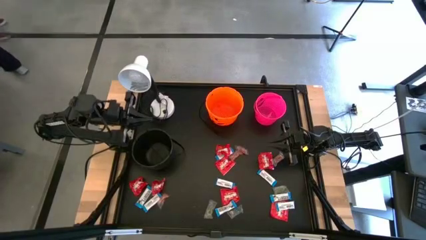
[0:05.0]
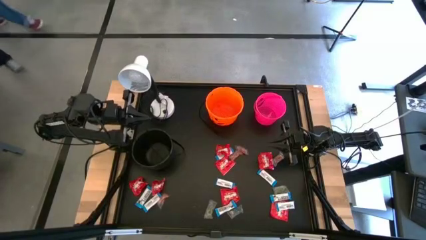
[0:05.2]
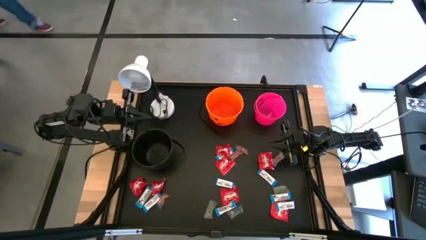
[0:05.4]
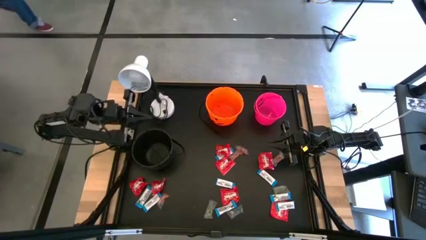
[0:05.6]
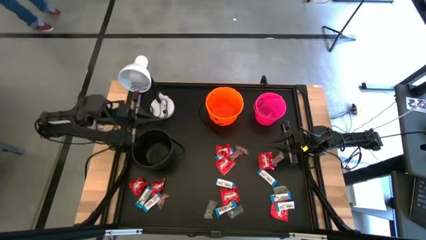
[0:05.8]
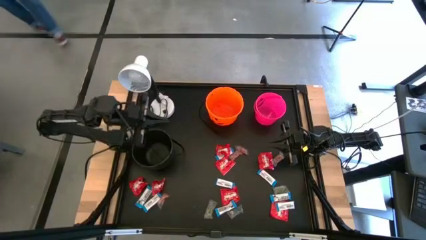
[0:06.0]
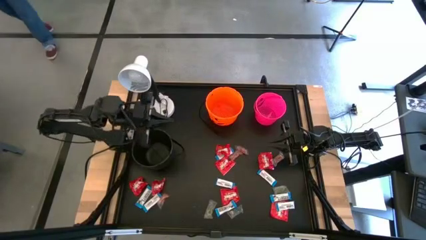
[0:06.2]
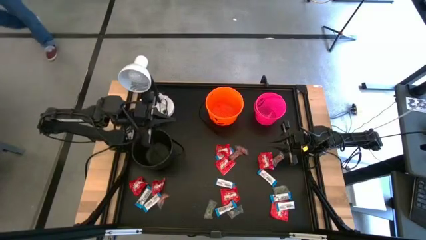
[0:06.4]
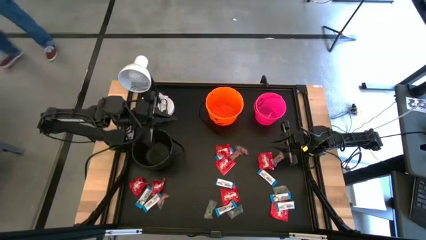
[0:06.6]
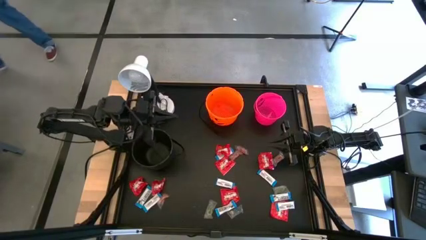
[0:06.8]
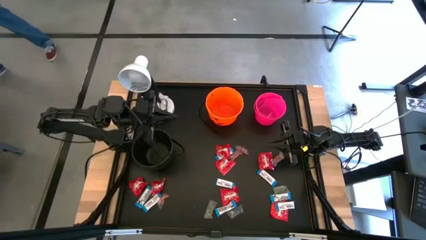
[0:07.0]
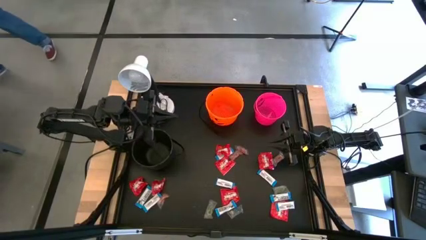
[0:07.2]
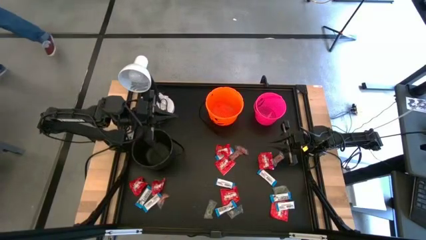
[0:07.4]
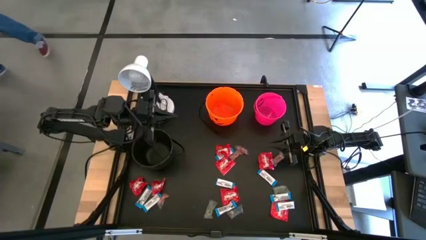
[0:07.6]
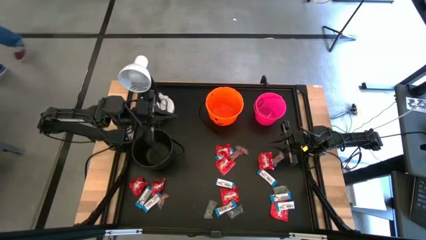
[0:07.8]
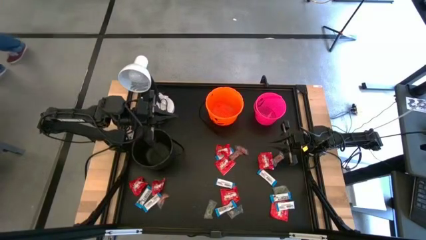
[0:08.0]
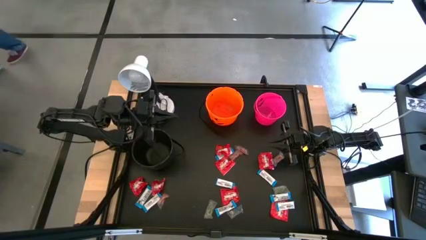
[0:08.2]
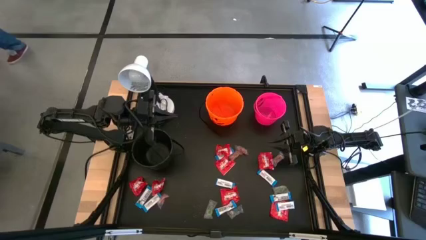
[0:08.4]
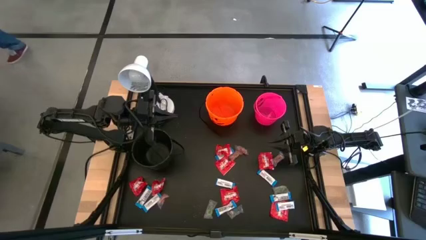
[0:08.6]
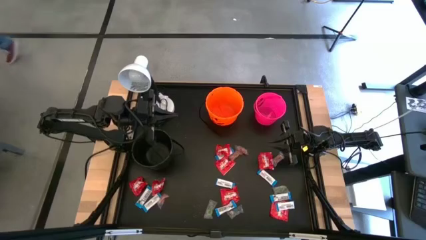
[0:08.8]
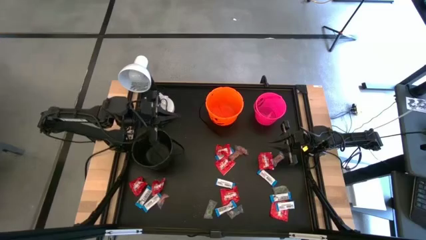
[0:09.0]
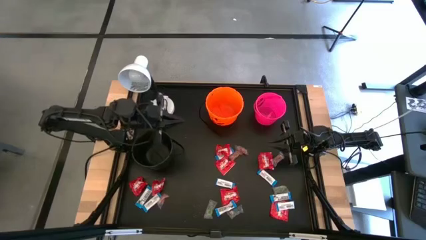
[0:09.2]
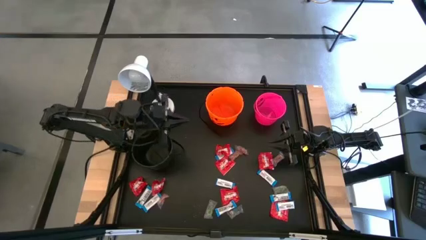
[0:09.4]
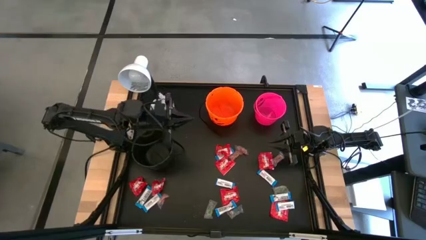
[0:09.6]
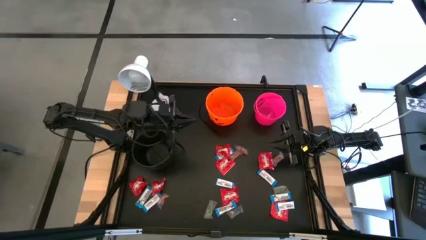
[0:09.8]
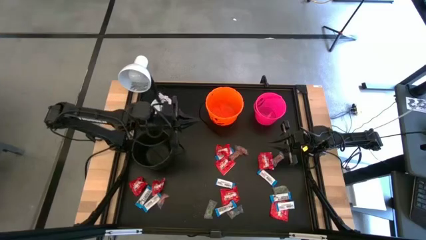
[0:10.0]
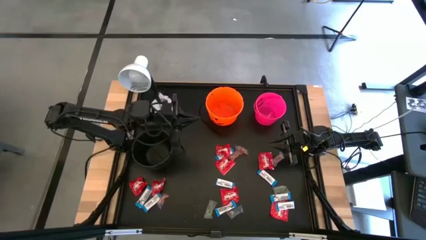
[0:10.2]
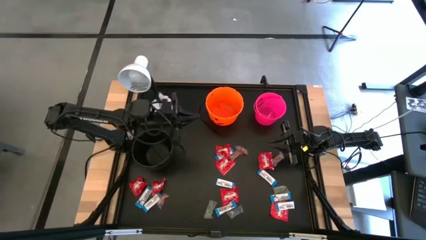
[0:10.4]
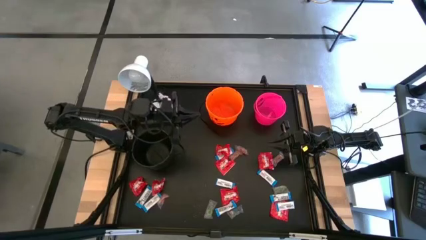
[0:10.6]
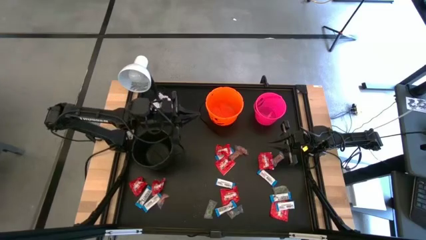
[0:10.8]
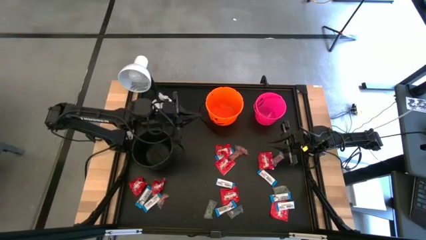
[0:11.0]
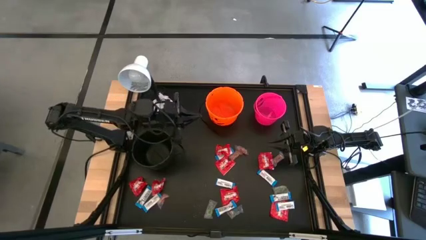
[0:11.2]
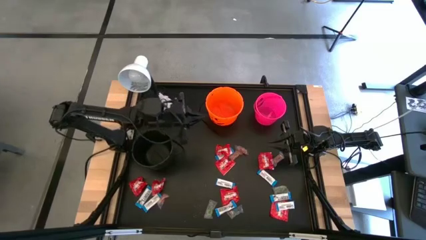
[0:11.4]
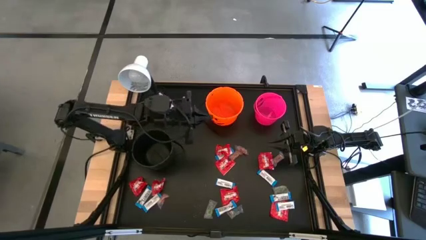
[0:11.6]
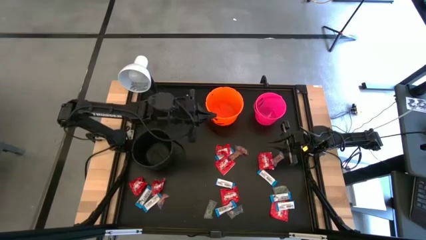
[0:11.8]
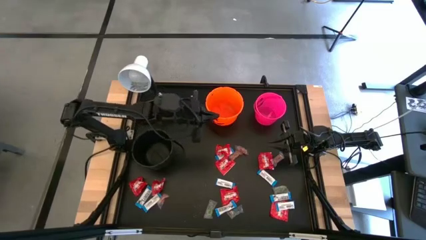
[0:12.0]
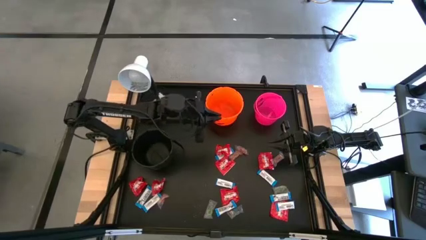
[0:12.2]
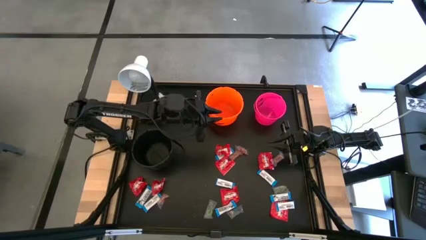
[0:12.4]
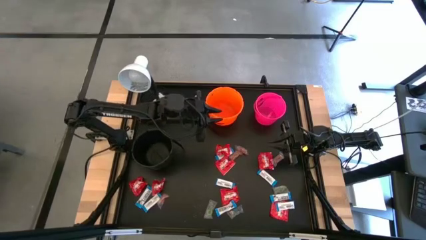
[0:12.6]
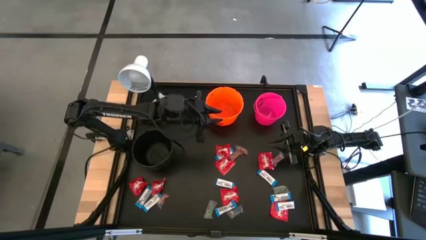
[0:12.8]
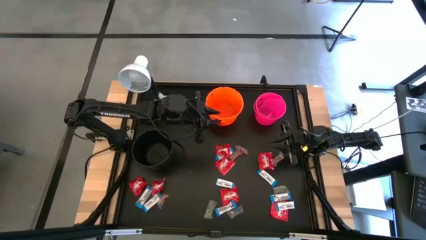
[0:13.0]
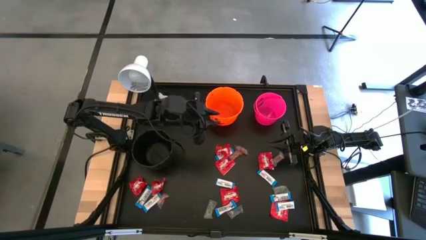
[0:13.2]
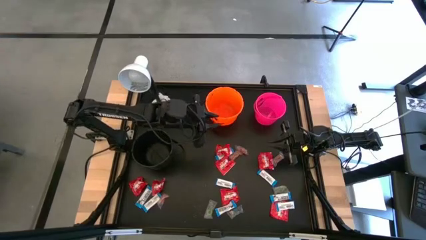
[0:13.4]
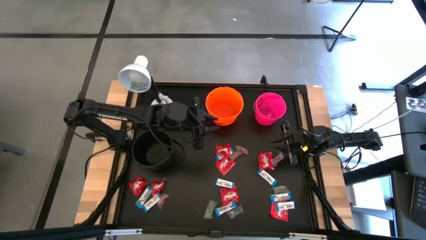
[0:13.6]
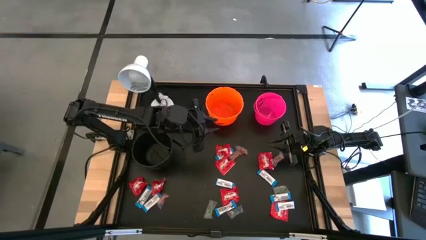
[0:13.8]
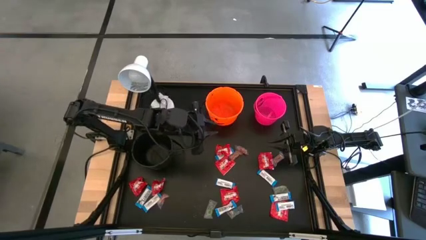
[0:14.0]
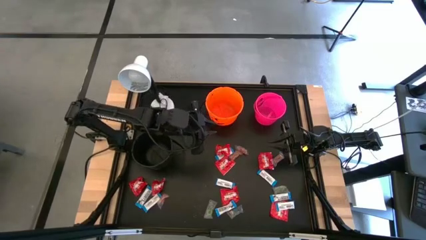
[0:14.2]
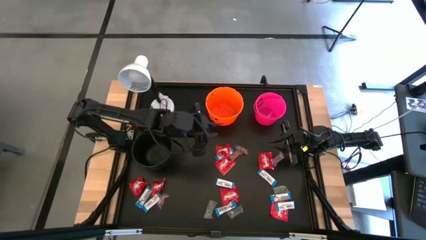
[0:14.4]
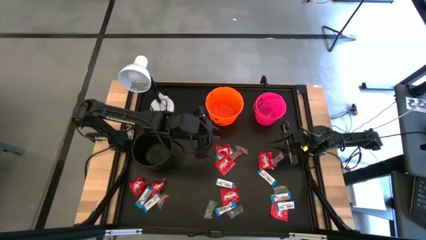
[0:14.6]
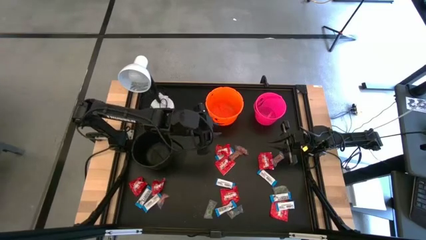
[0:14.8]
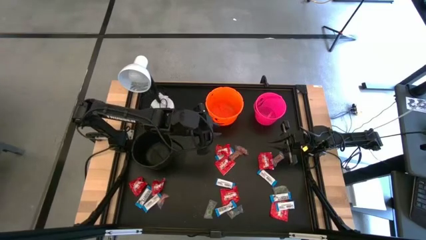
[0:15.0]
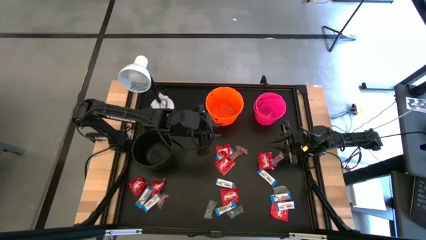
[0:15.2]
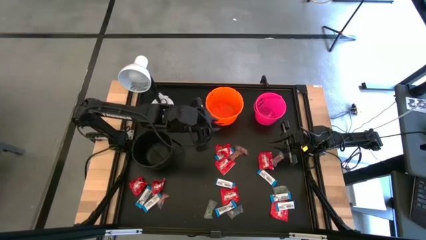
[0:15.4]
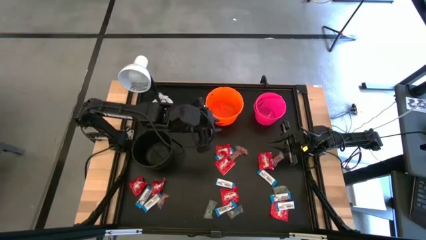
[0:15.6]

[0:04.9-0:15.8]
Task: Sort candy
Put the red candy into the orange bucket

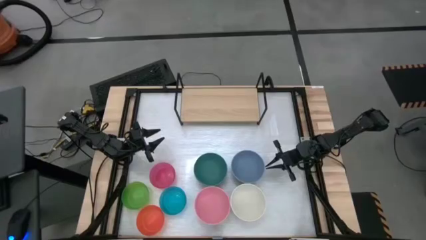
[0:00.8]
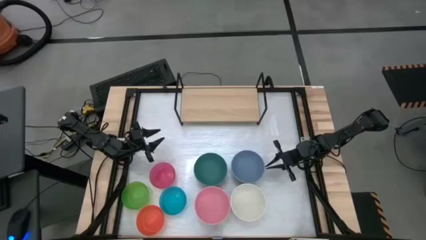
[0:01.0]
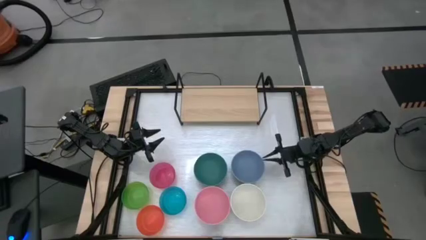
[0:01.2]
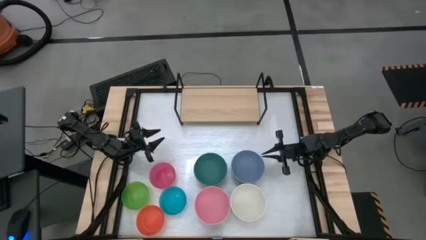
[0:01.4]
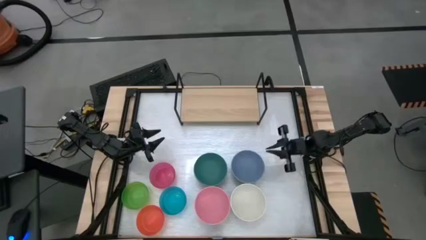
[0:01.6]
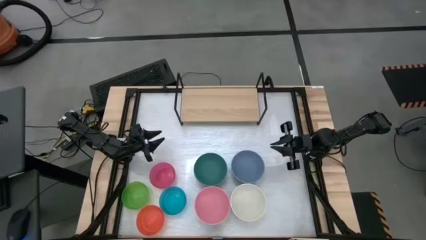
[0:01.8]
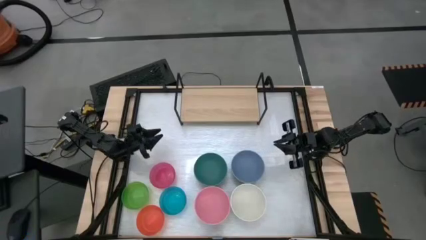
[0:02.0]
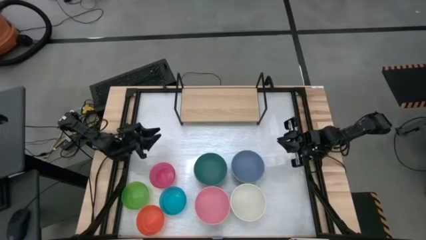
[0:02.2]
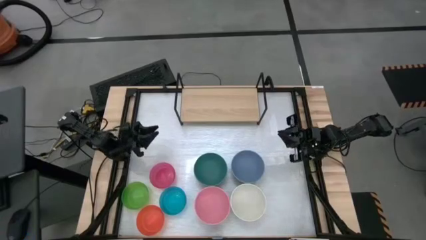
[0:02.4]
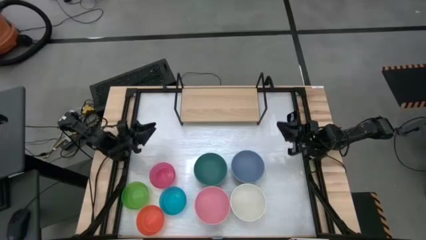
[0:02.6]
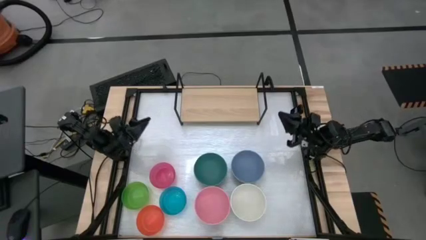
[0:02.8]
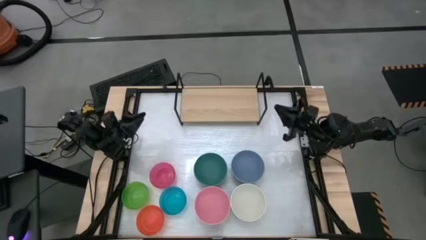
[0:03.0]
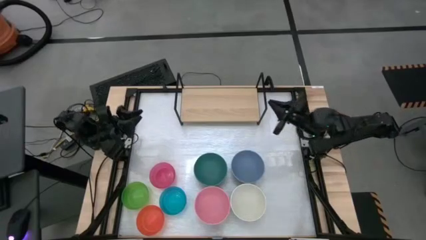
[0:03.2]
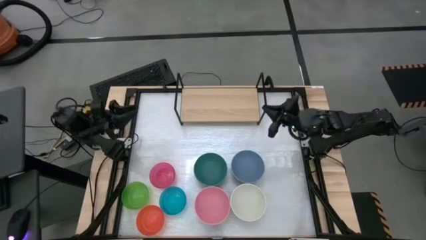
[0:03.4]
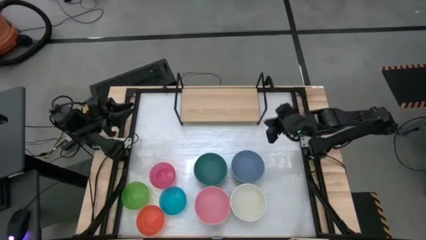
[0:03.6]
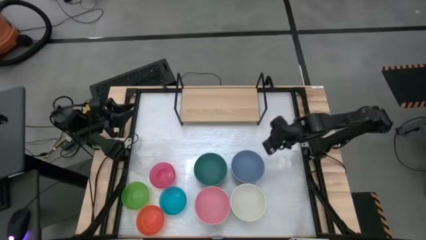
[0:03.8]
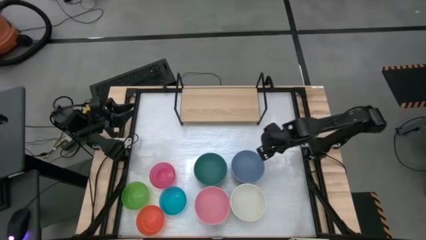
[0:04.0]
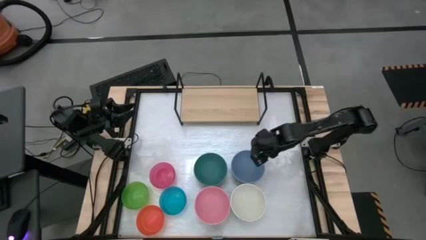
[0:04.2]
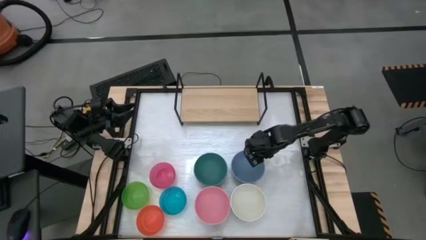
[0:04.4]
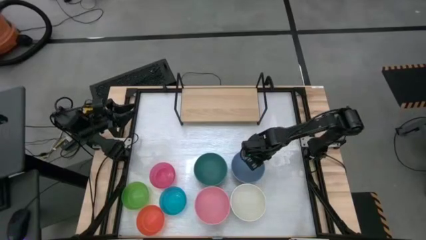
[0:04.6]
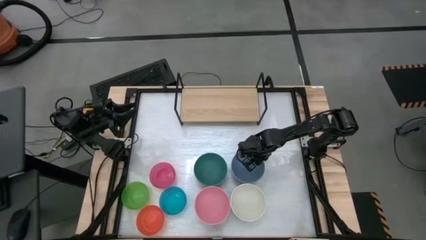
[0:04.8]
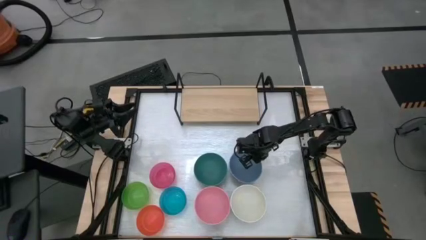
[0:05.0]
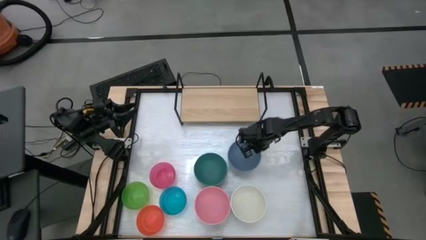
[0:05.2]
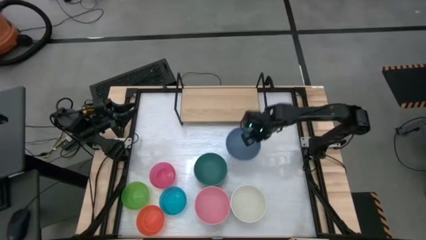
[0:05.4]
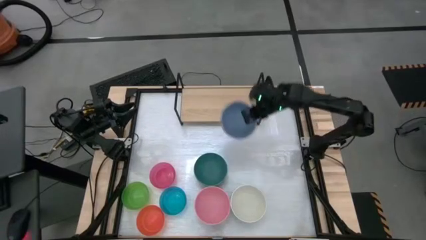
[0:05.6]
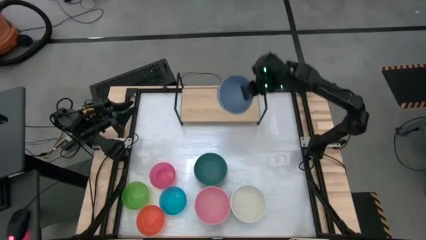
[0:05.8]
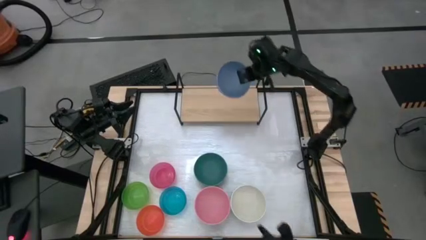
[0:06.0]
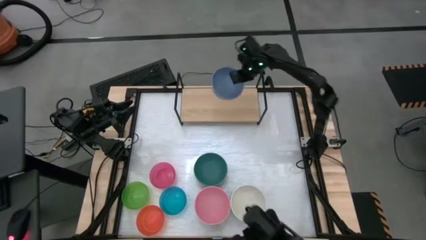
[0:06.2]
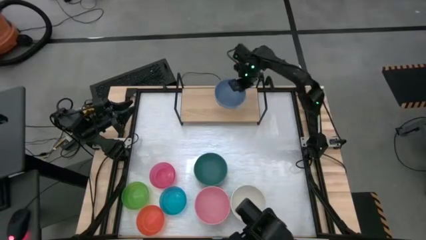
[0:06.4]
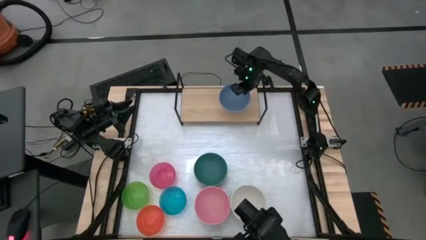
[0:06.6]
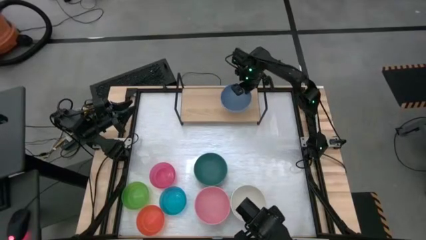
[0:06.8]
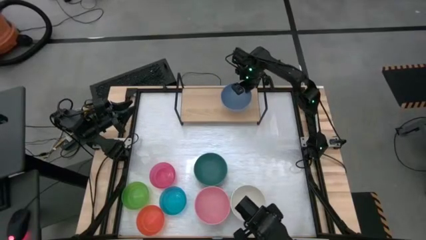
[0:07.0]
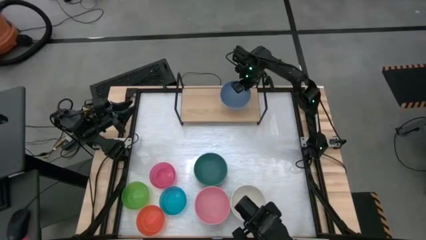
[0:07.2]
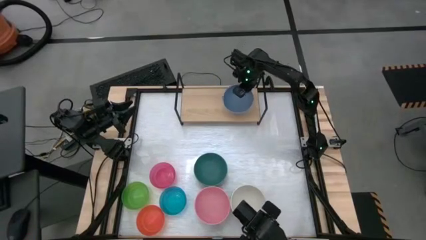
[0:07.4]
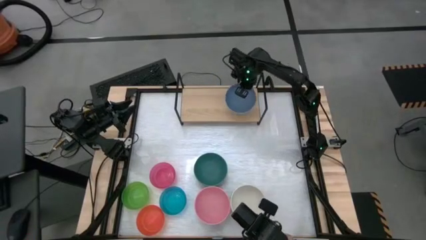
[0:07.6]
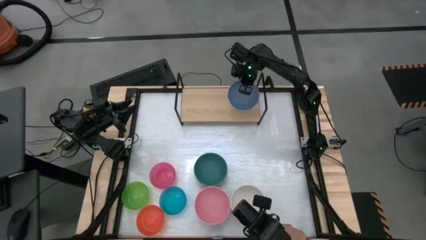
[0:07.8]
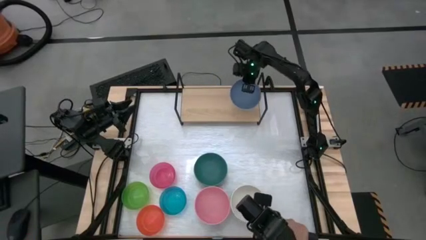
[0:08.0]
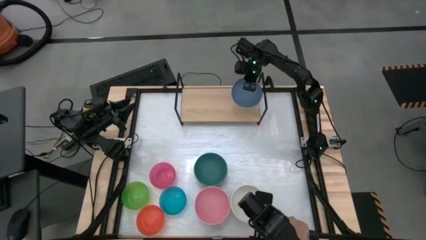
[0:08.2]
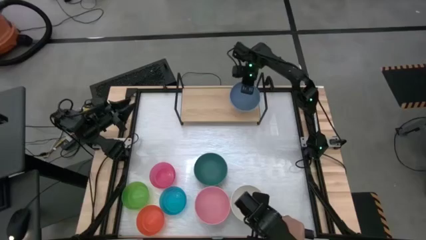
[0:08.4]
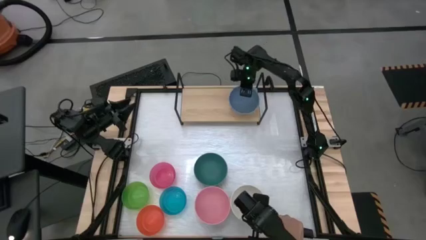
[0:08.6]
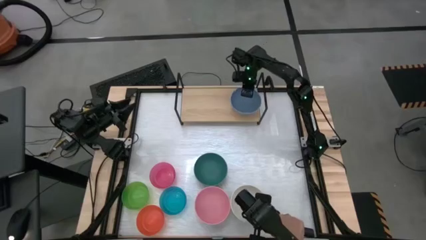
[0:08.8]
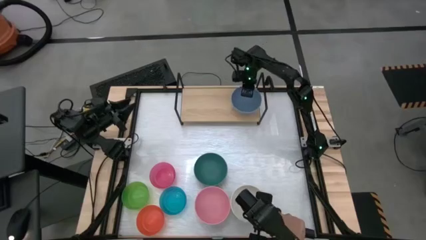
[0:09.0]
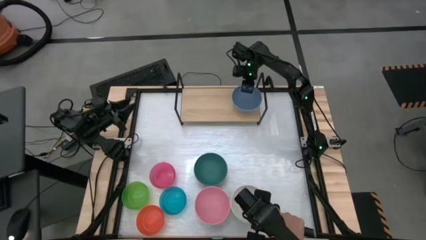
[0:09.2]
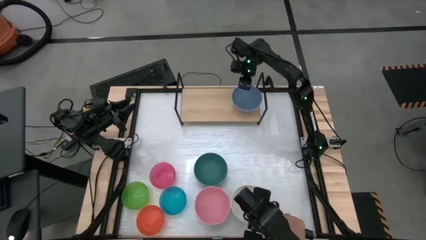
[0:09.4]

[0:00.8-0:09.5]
Task: Place and stack bowls onto a shelf
Put the large blue bowl on the shelf
